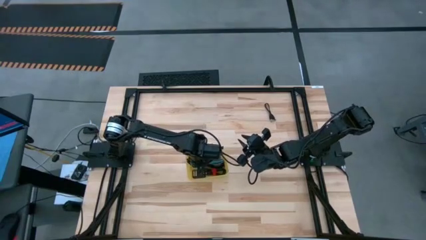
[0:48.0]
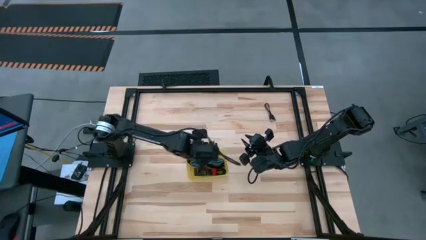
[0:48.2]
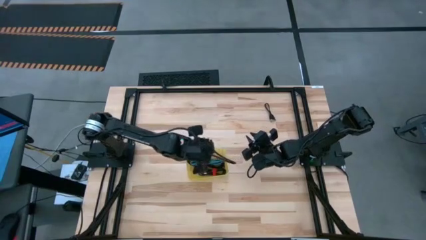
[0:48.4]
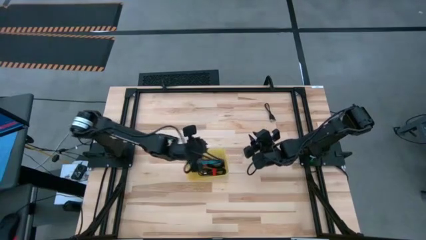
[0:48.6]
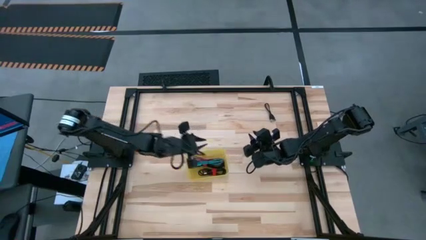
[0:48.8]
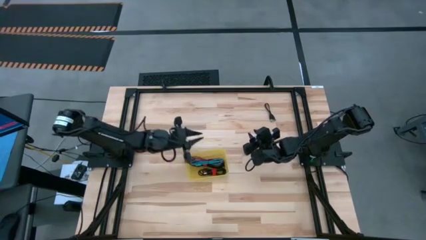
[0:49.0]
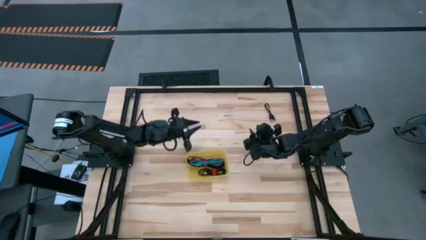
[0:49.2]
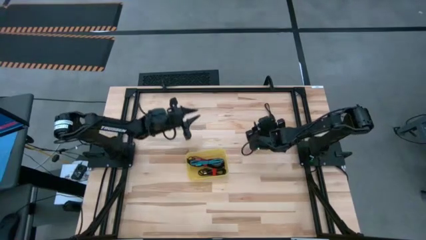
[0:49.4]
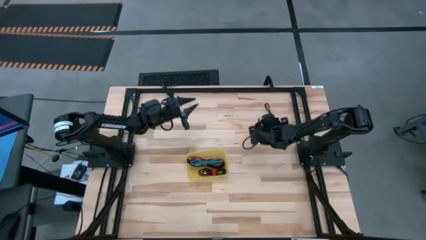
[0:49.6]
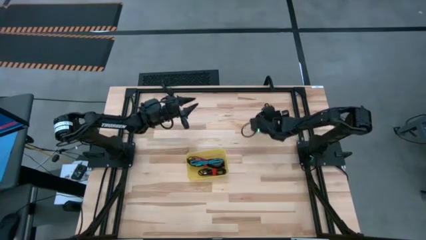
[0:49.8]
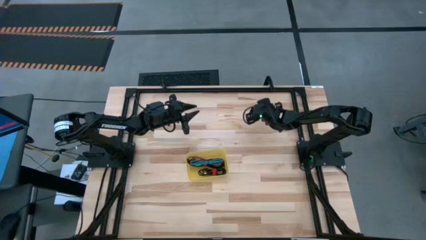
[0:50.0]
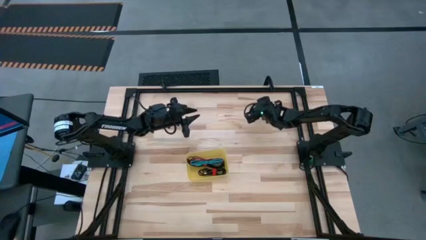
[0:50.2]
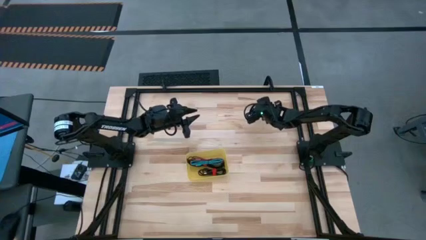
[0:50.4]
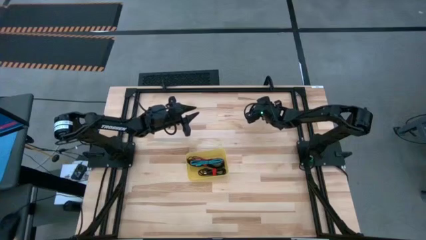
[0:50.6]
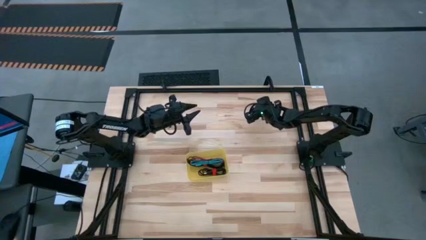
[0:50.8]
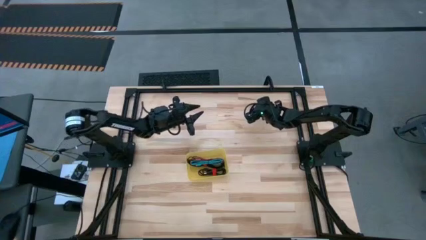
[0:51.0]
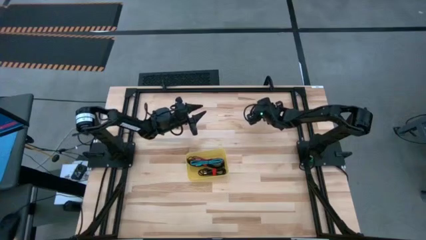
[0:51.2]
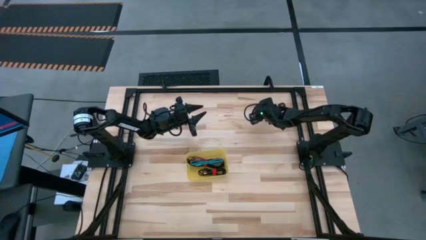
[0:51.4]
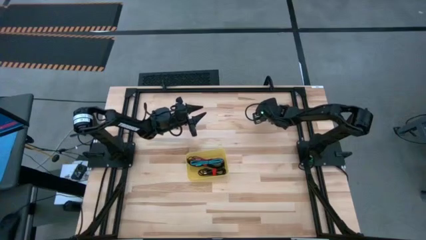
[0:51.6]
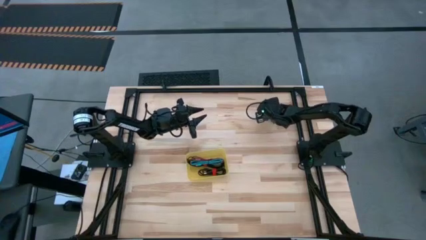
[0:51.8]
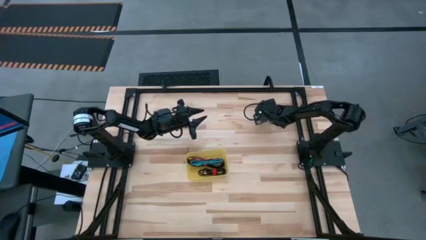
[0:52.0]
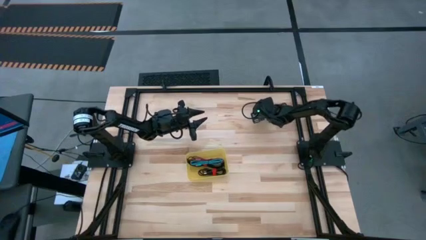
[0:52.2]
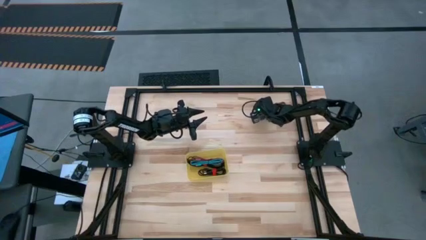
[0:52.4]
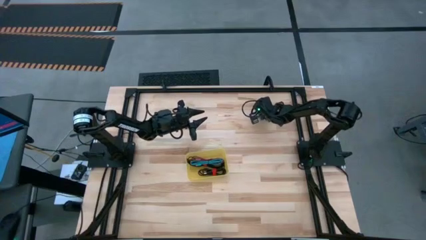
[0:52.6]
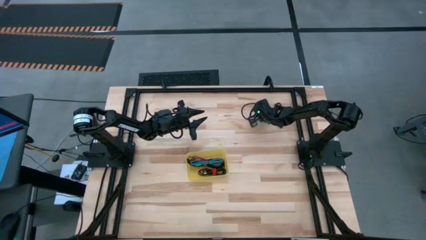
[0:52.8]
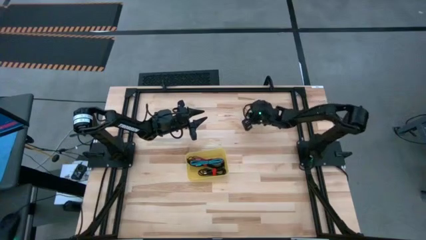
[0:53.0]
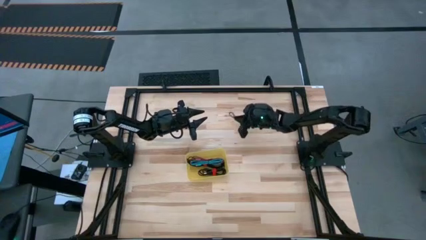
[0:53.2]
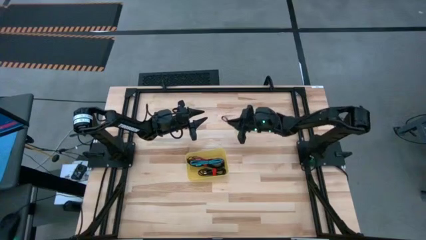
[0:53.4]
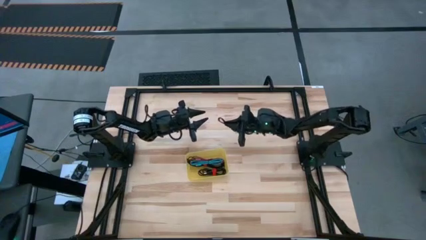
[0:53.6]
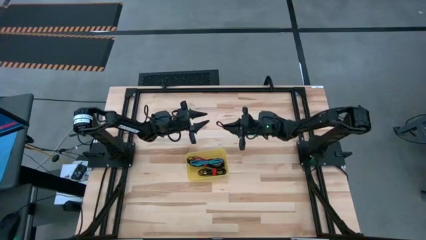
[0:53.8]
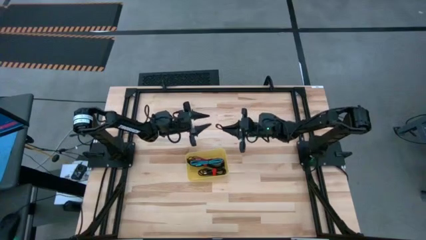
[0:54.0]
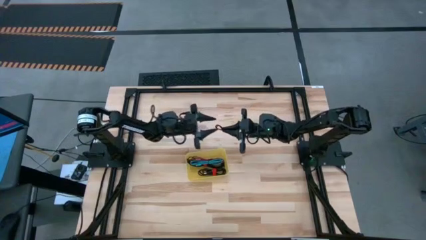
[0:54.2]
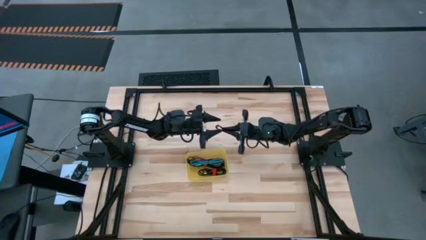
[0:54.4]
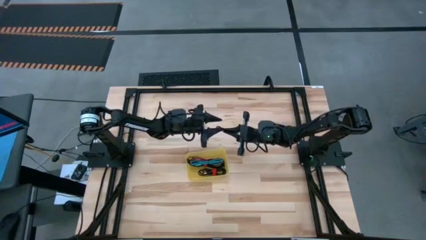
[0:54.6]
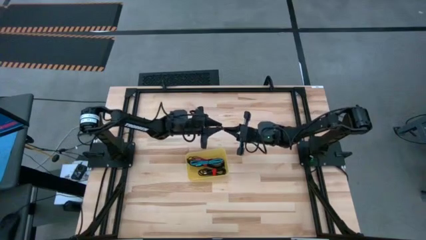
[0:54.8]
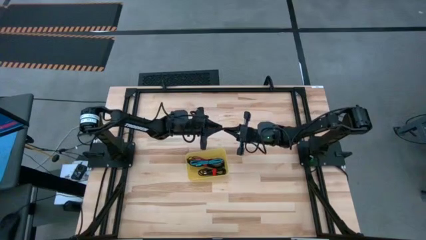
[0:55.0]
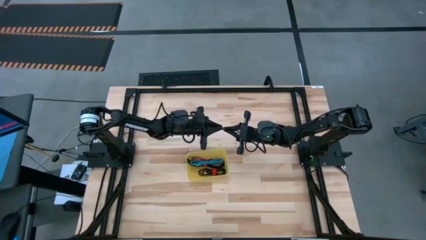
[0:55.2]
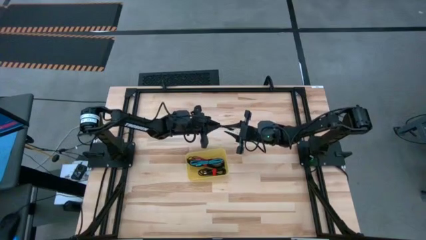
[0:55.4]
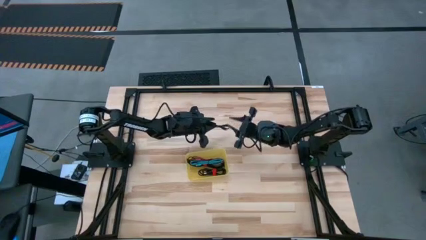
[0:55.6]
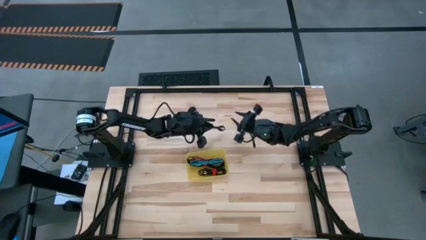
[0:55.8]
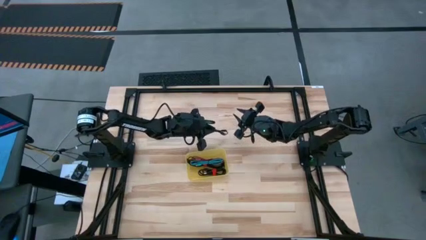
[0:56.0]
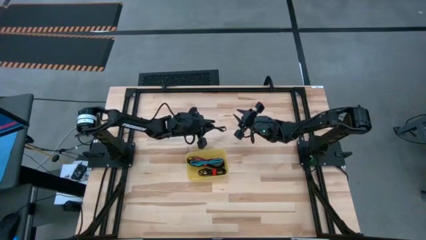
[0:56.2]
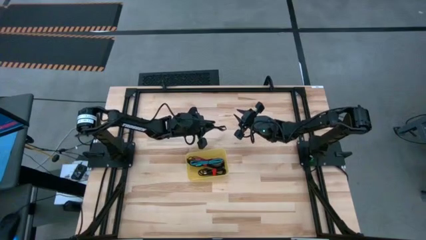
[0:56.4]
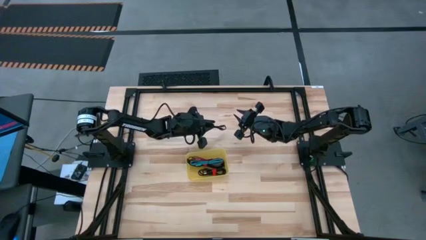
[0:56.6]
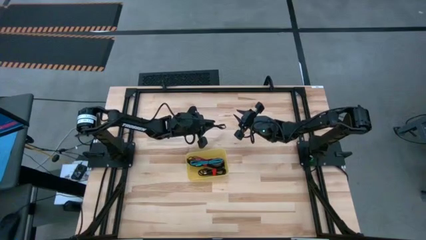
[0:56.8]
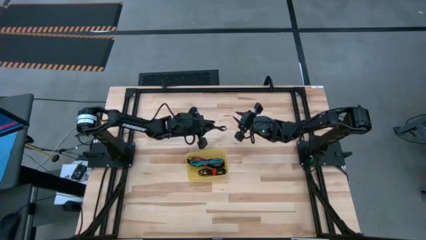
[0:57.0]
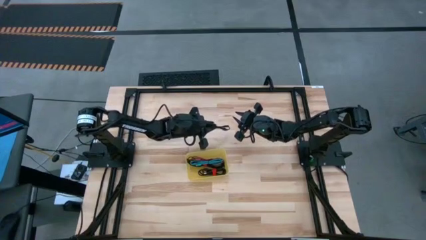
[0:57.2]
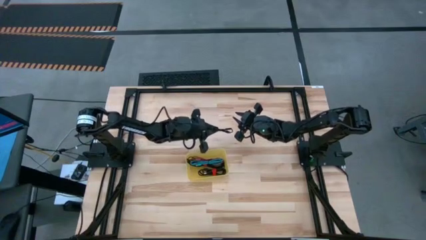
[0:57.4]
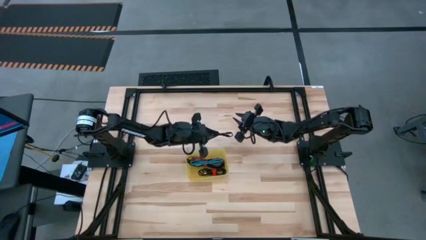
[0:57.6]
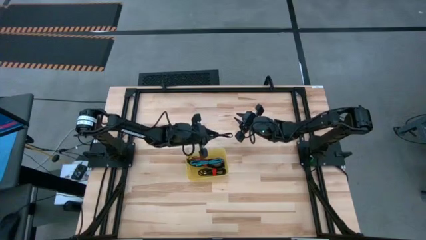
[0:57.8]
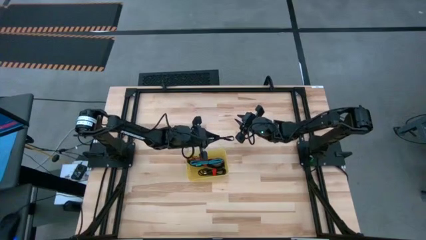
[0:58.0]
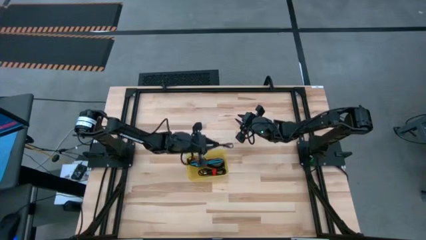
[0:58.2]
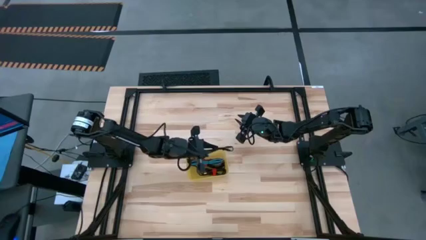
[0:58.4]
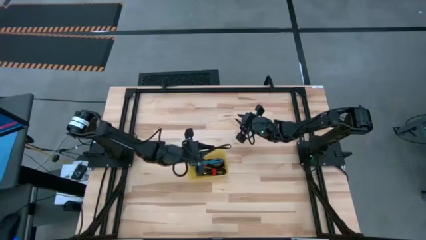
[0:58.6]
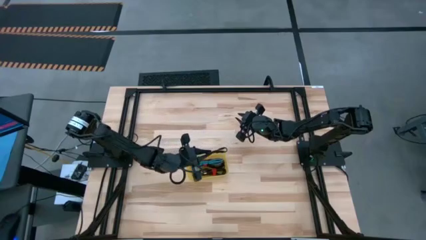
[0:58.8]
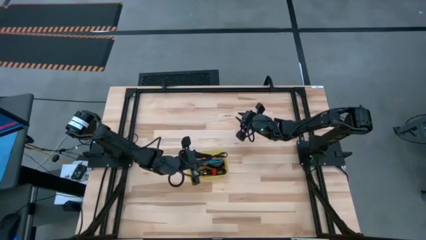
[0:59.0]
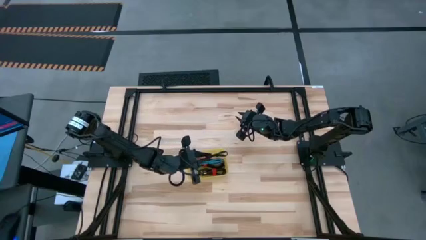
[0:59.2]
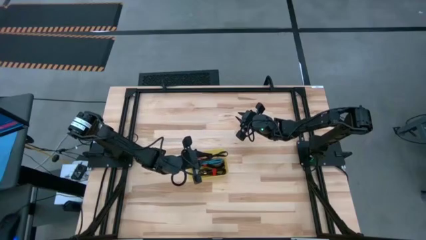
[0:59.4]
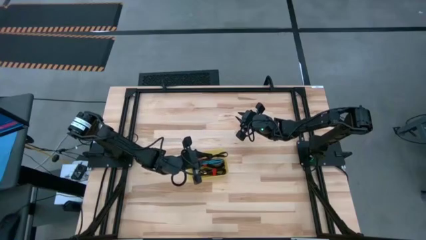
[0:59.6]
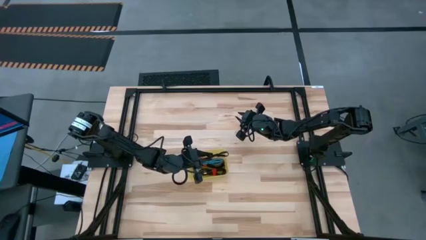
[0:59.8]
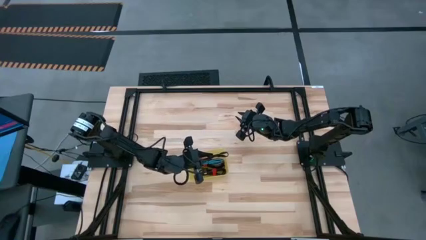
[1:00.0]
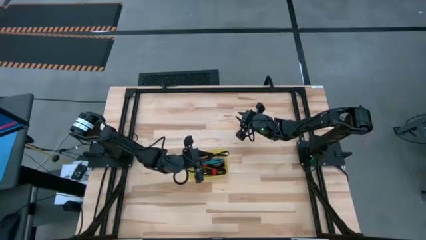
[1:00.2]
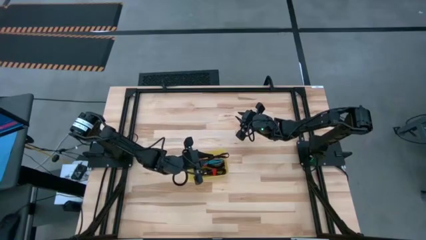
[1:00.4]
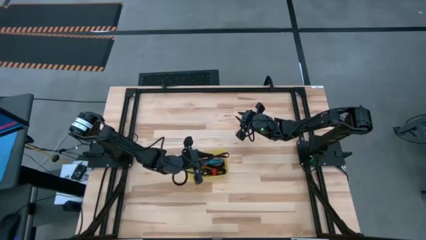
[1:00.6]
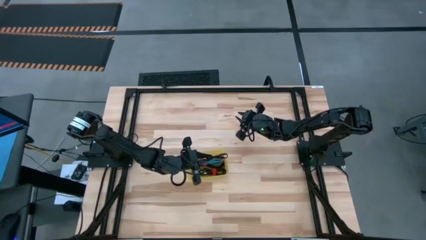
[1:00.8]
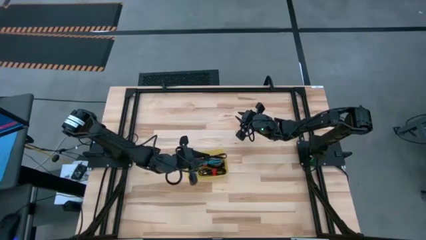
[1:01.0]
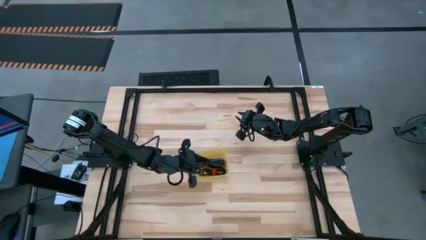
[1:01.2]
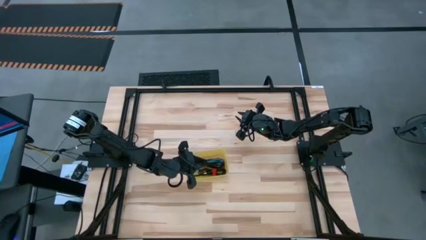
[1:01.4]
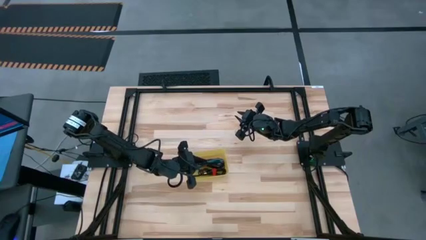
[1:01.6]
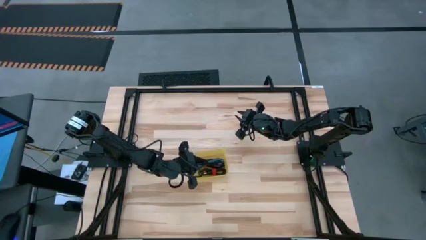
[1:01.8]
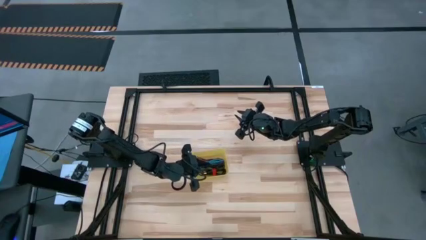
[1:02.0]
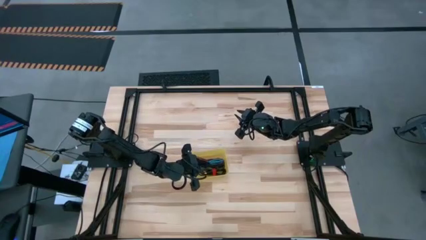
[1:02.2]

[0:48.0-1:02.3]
Task: Pick and place USB-C Cables
Put the black charger cable into the yellow bin
